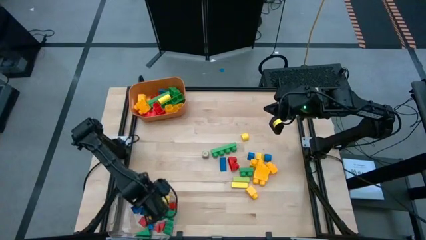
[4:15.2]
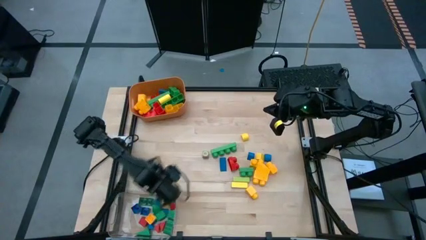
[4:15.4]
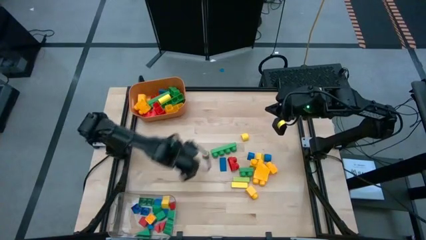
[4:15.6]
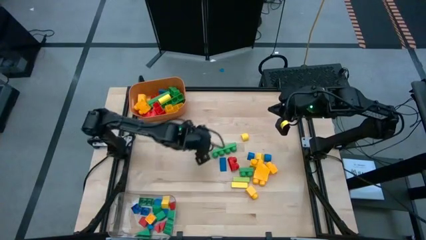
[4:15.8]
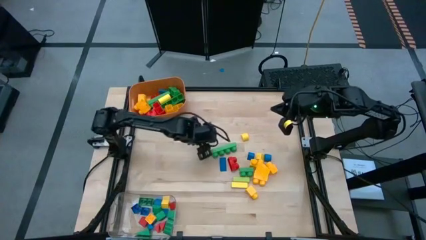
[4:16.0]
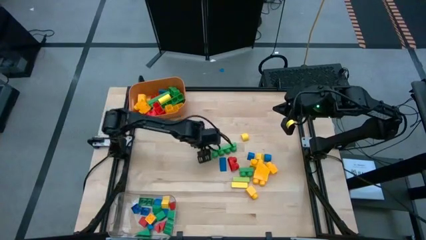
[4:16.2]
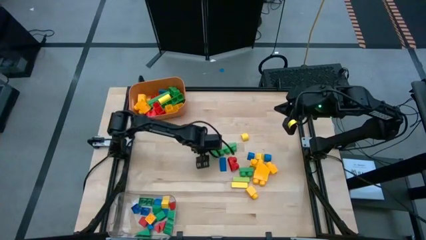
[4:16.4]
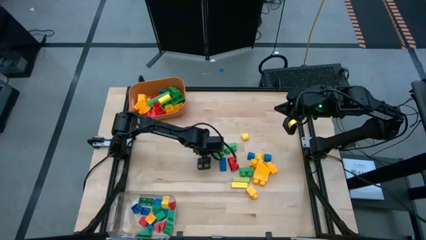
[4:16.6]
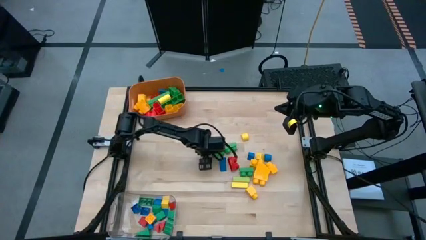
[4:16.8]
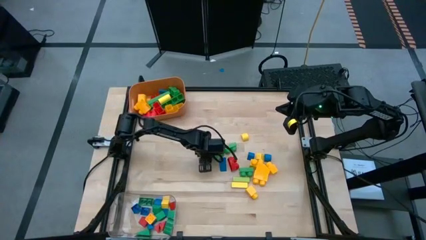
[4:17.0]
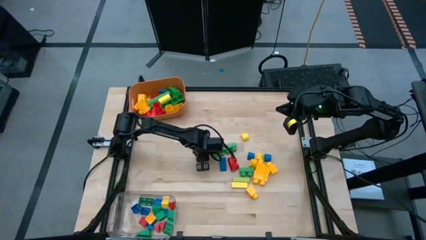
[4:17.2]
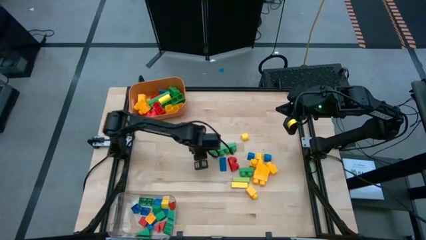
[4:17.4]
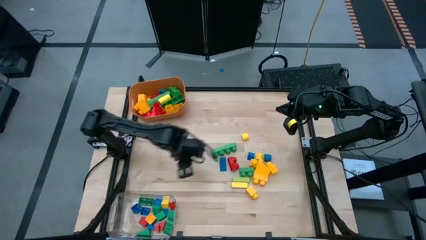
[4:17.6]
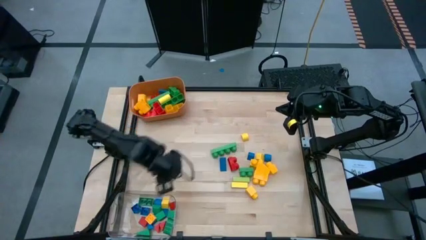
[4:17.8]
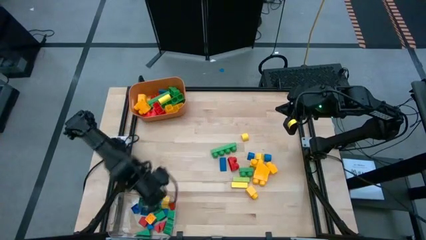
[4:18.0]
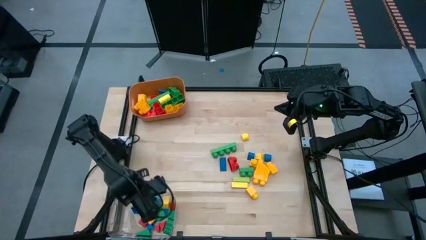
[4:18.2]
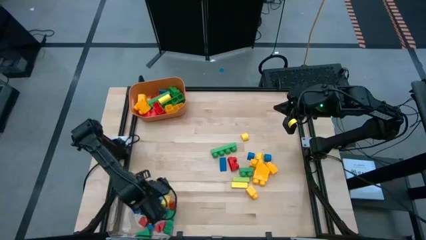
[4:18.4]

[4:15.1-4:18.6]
Task: Sort blocks by size
Put the small wooden block into the transparent bin

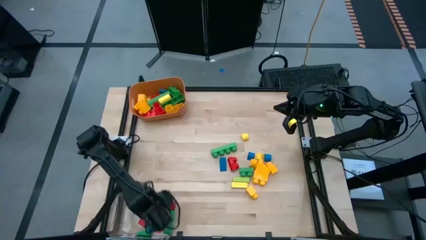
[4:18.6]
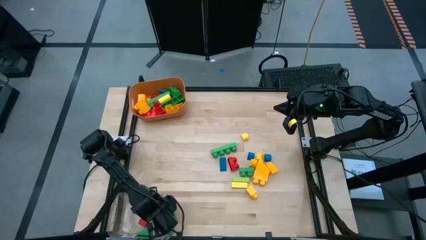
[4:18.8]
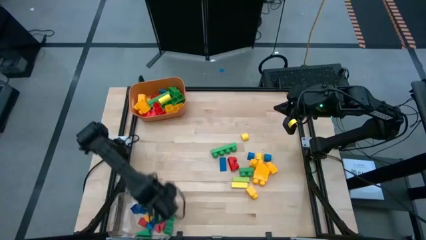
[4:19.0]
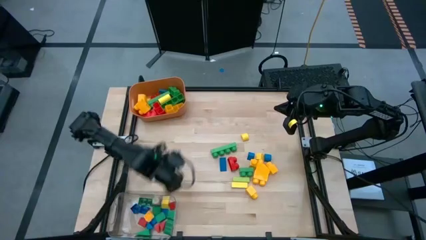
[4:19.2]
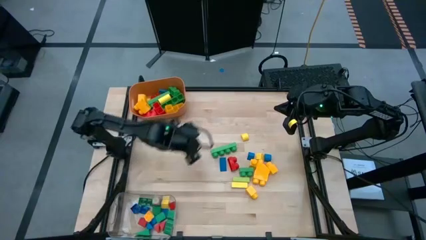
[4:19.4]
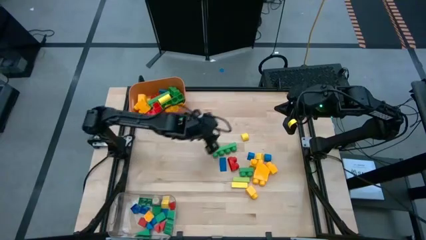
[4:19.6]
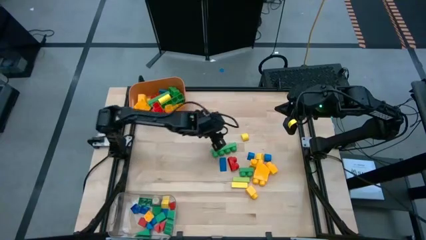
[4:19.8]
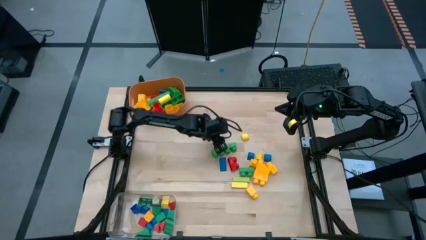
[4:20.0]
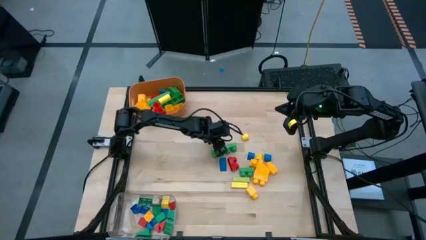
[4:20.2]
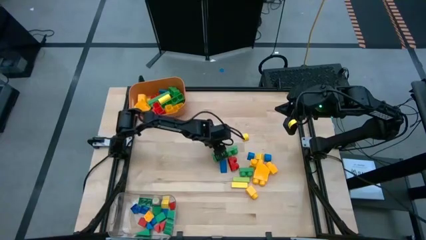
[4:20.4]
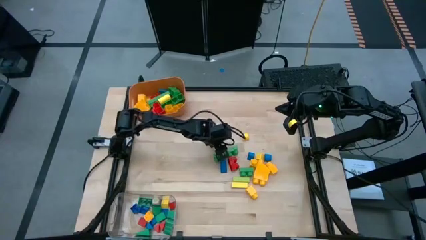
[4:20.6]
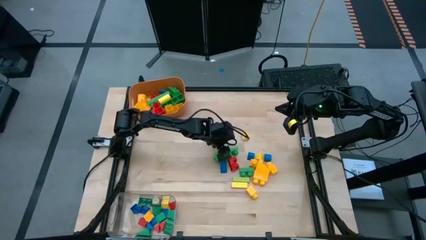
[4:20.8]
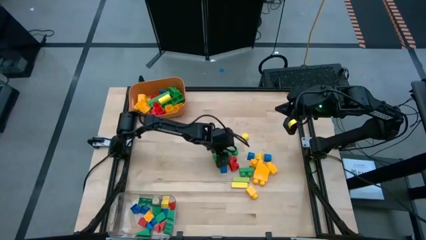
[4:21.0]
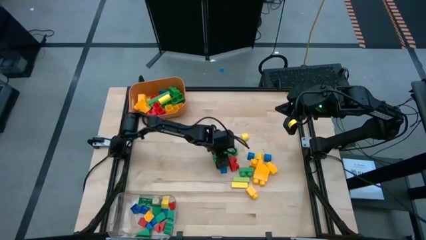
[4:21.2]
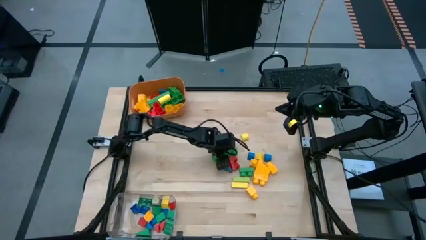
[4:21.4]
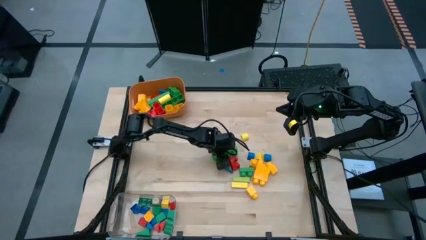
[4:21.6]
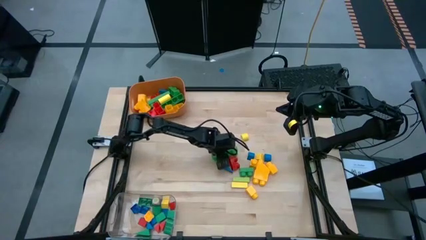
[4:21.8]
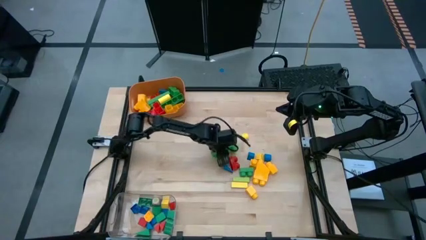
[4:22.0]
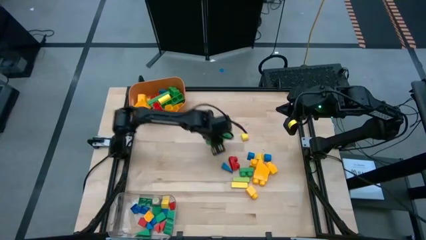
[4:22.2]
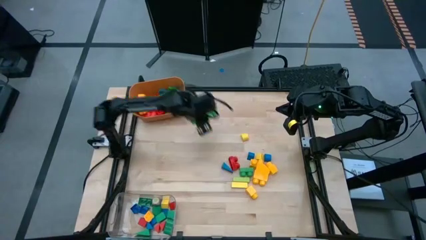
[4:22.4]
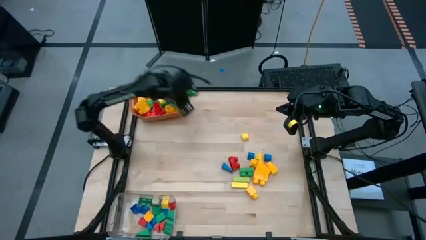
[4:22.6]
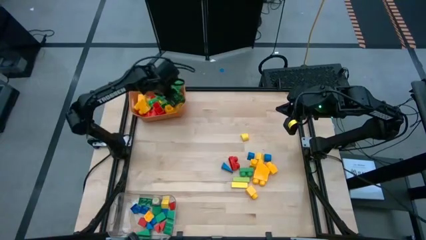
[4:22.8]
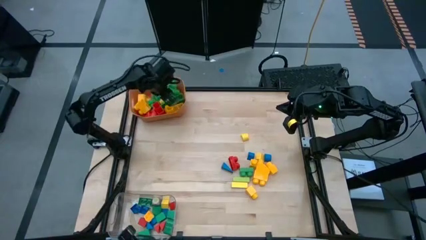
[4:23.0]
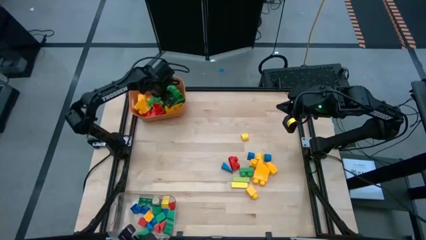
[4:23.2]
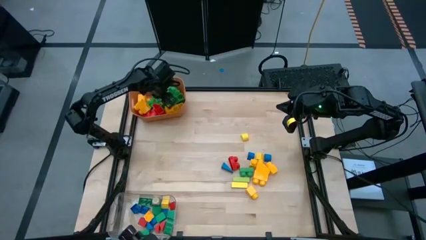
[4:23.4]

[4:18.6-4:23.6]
Put the big green game piece into the orange bin

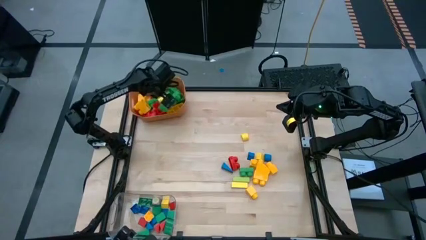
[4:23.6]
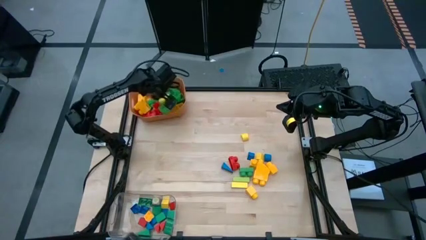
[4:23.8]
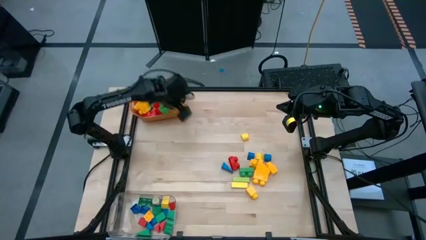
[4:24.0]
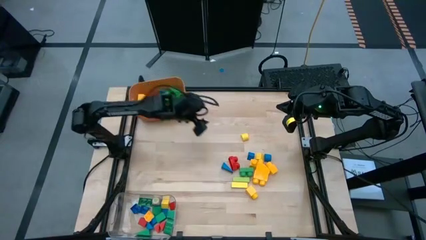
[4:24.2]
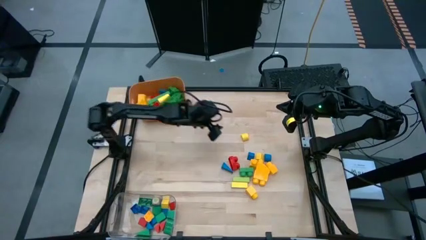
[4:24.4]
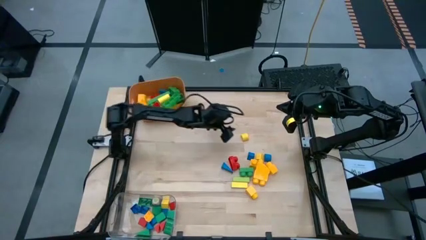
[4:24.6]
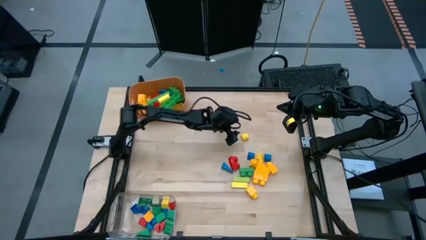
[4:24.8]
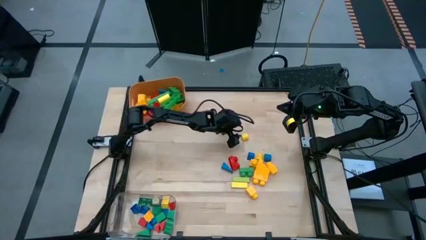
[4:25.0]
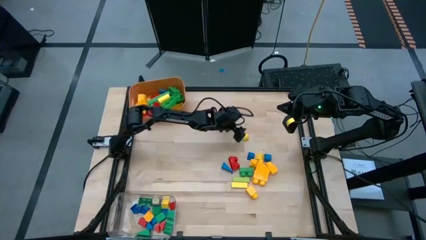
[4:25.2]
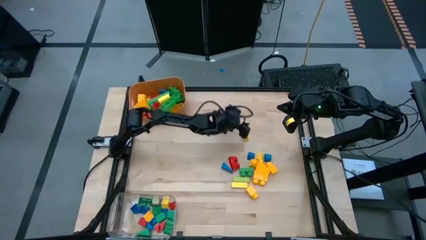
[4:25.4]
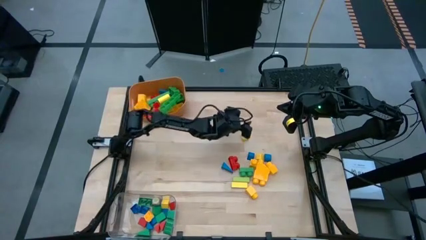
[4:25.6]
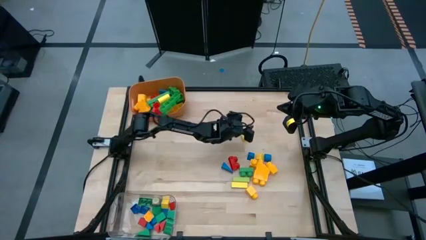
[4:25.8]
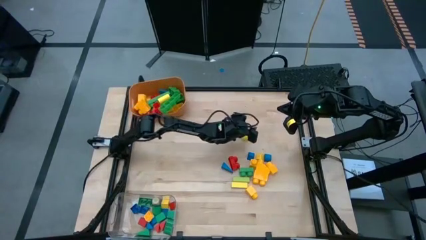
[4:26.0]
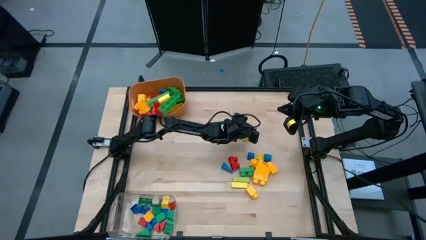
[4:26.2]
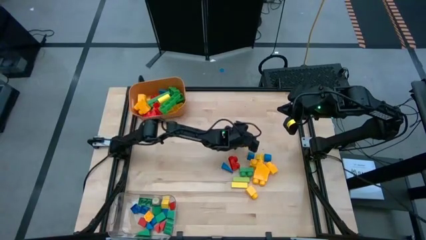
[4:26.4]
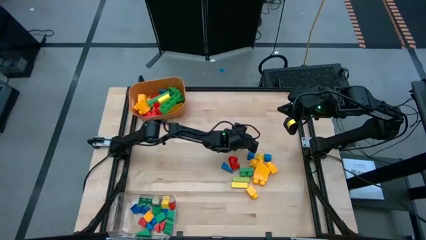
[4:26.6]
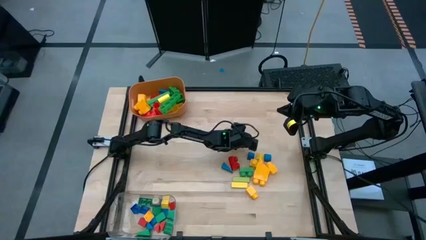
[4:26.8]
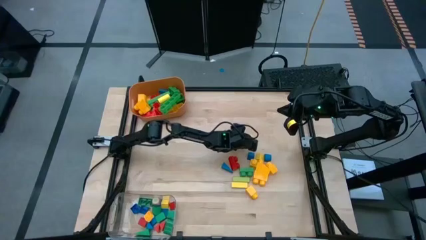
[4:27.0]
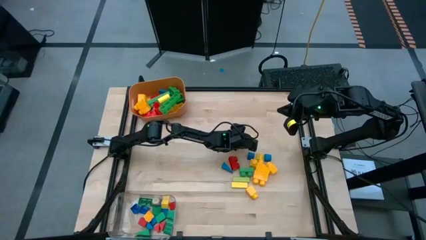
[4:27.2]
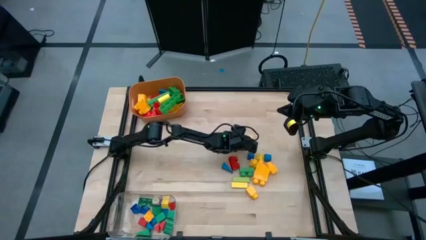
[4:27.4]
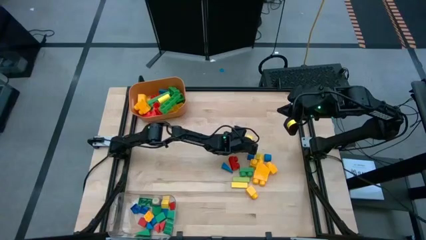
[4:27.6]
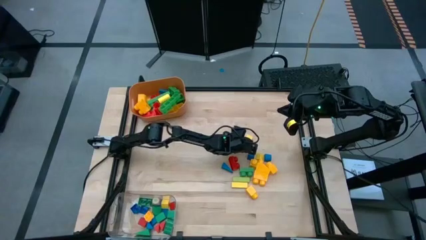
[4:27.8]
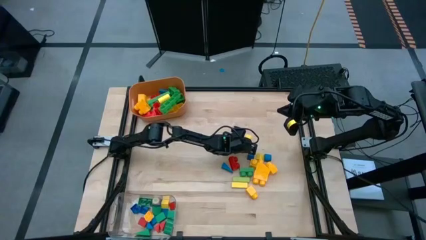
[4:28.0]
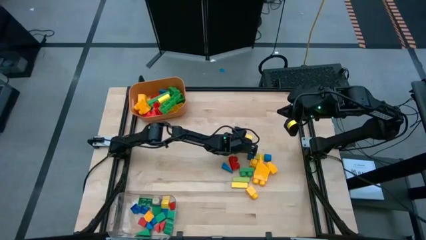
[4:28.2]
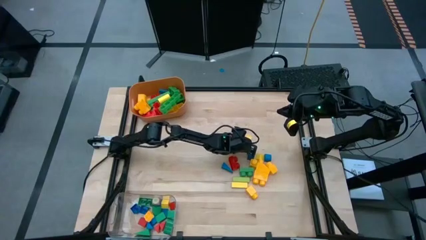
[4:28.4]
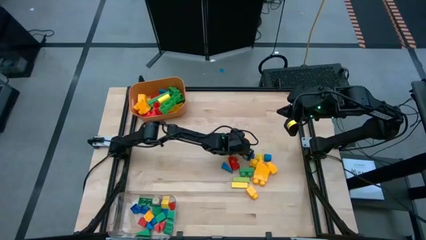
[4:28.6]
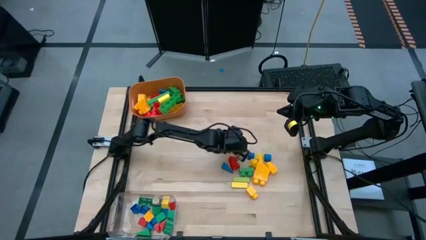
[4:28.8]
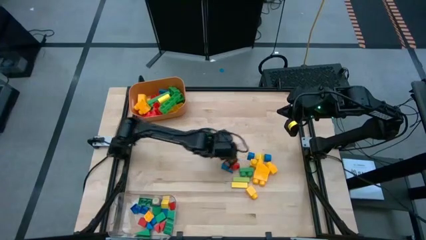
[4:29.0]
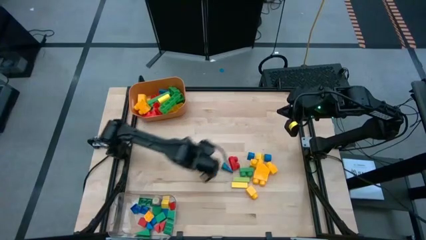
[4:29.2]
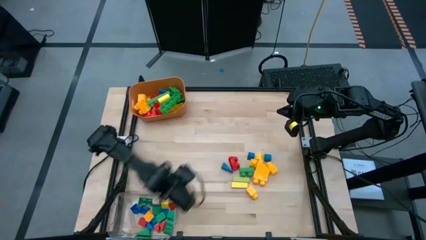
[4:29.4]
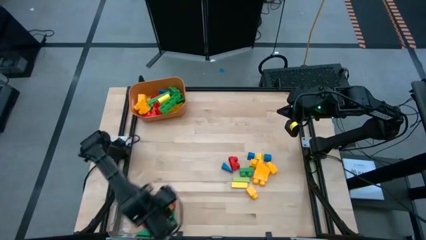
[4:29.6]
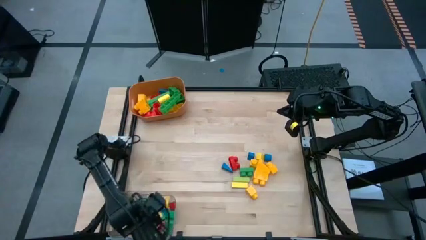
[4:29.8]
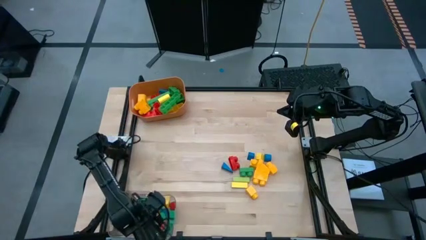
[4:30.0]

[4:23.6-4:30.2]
Put the small yellow block into the transparent bin

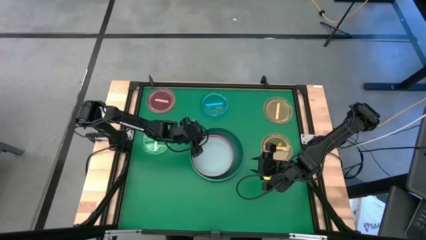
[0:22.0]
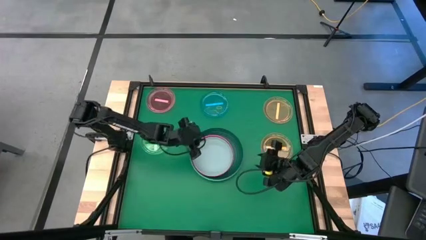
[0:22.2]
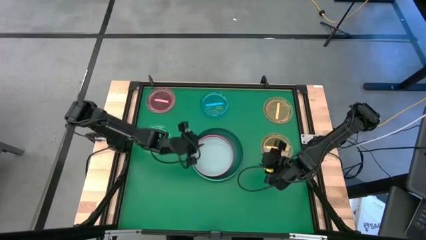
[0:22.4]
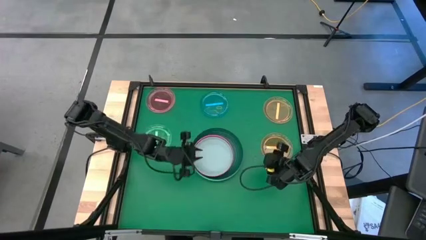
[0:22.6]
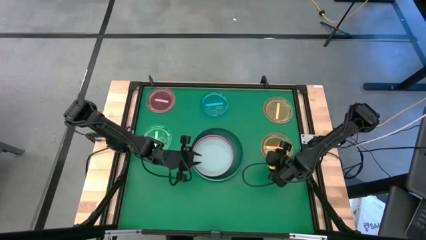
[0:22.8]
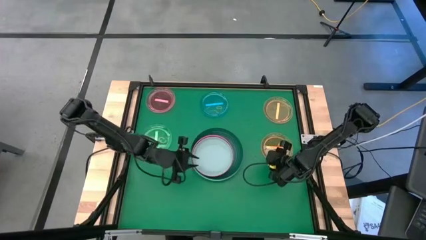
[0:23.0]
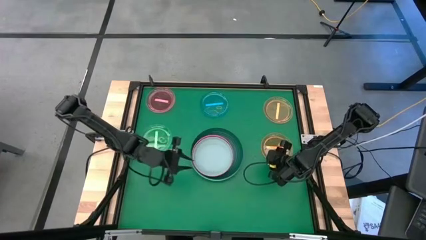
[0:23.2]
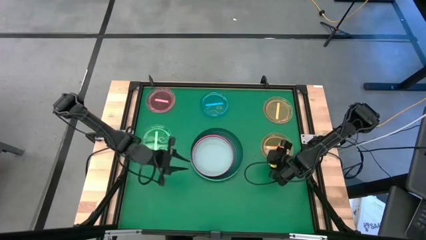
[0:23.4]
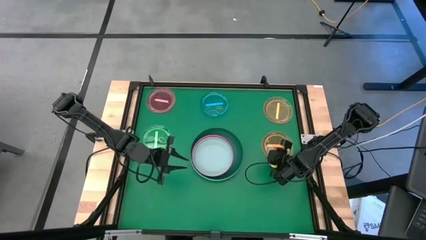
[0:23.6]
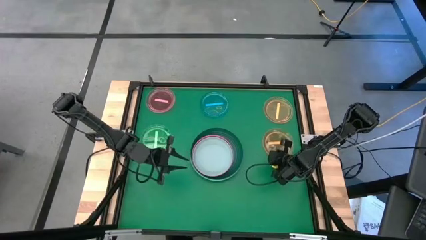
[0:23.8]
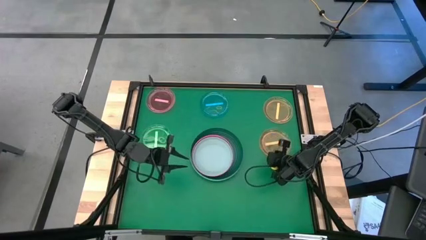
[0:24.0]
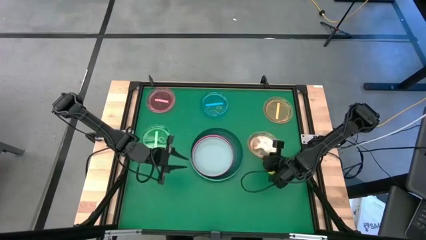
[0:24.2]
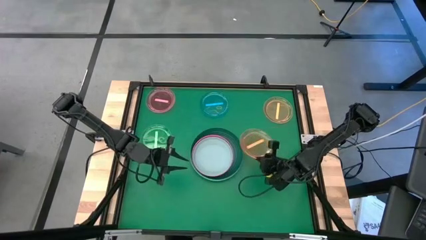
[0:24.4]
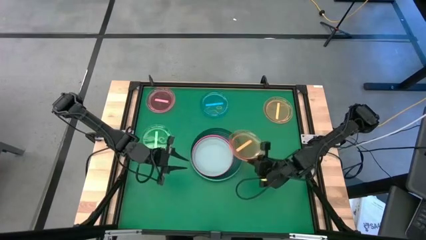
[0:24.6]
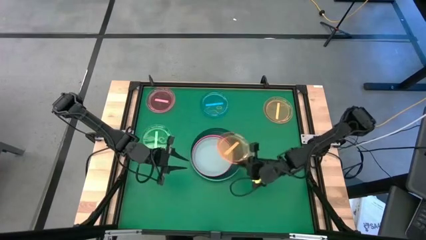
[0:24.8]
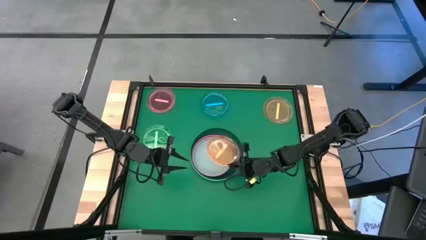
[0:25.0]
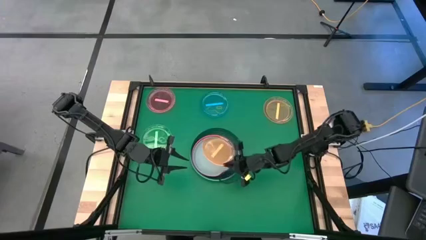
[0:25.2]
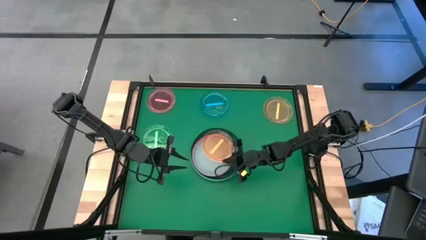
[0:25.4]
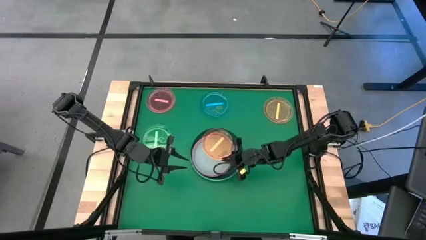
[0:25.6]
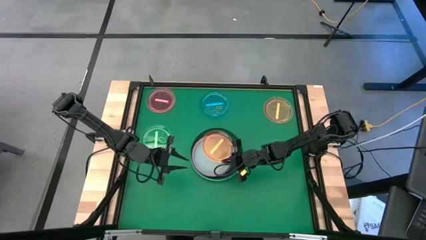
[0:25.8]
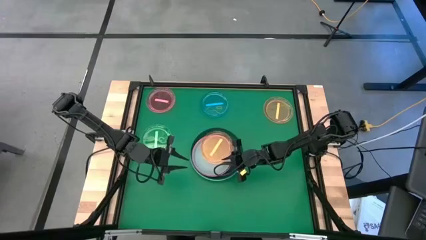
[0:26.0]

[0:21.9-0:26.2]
Task: Stack plastic plates
Stack the bottom orange plate on top of the gray plate
